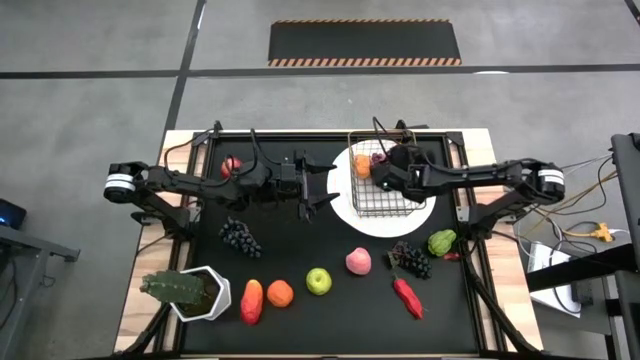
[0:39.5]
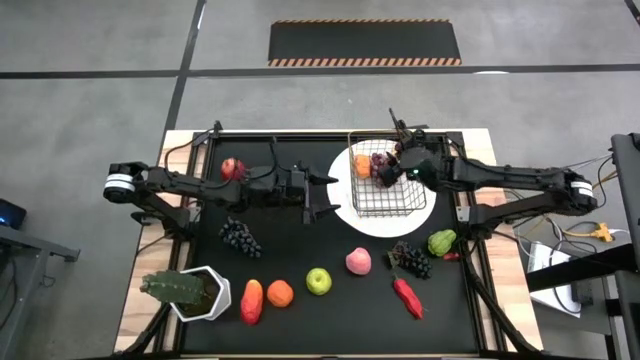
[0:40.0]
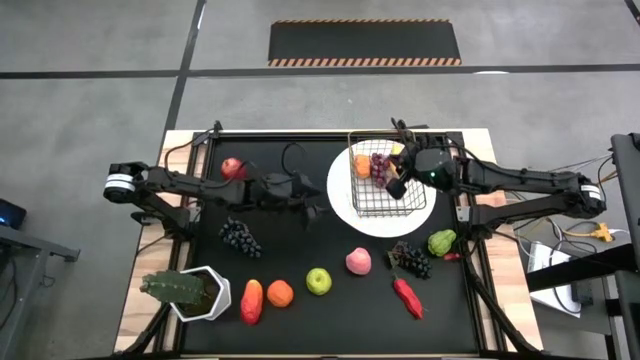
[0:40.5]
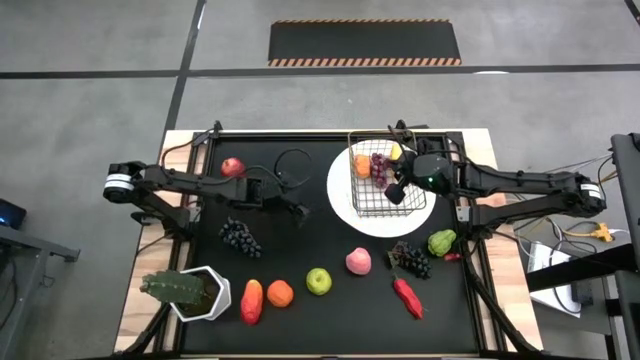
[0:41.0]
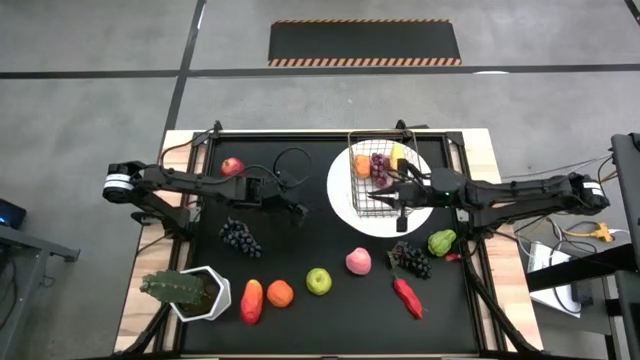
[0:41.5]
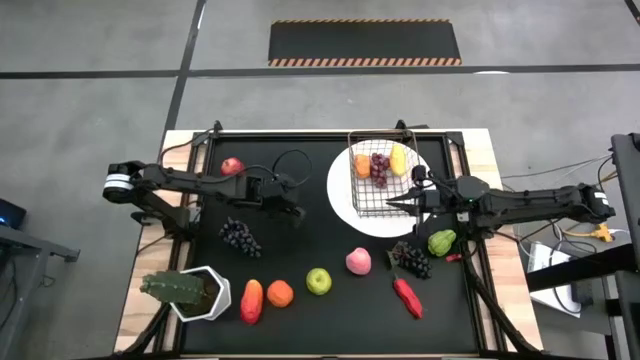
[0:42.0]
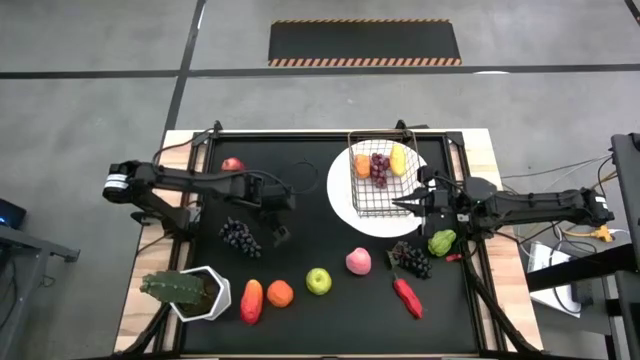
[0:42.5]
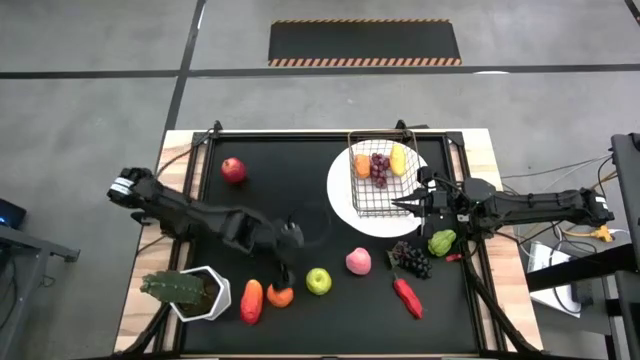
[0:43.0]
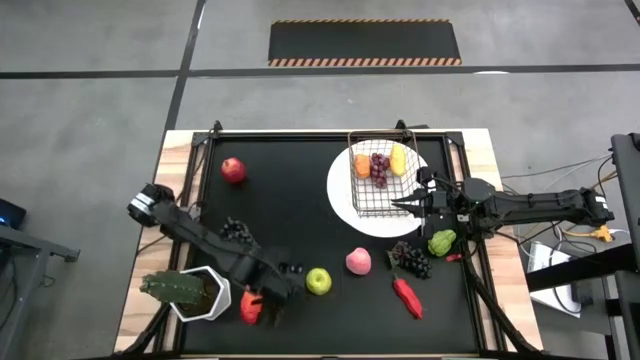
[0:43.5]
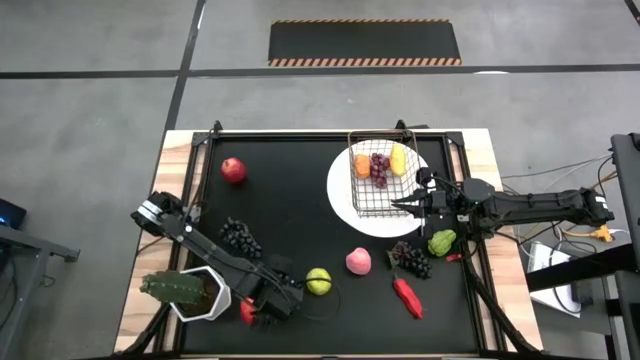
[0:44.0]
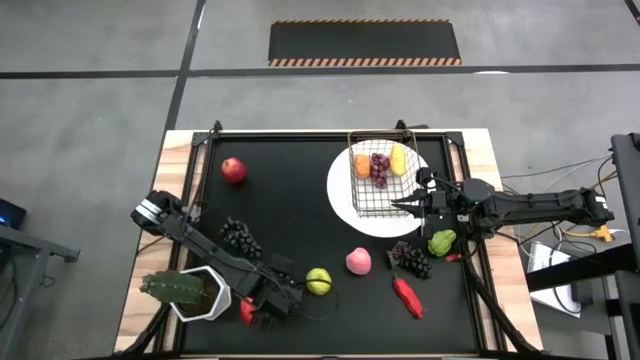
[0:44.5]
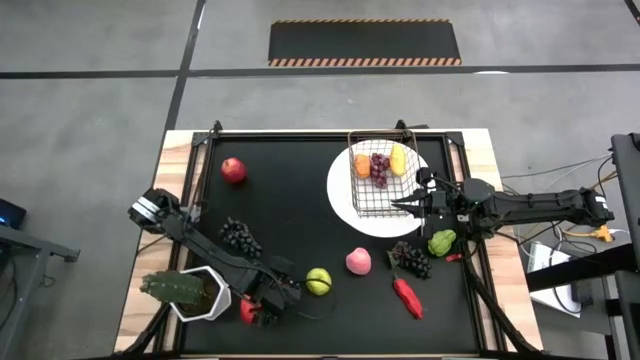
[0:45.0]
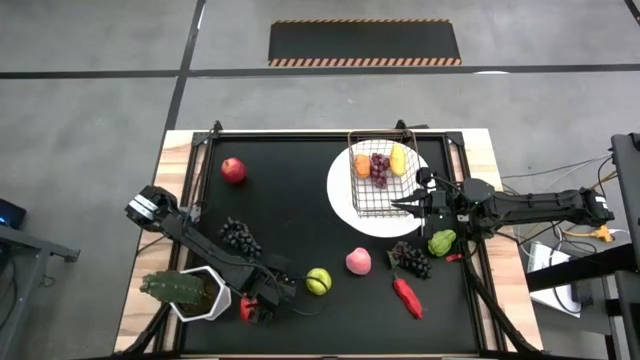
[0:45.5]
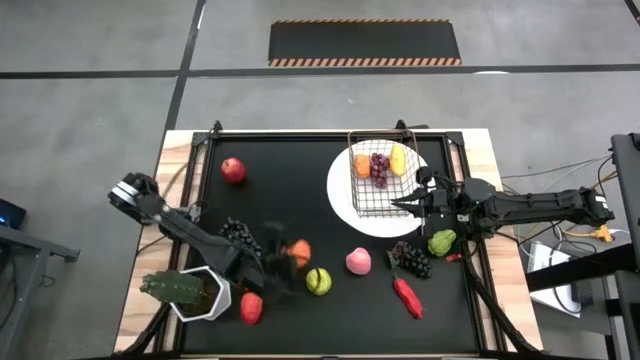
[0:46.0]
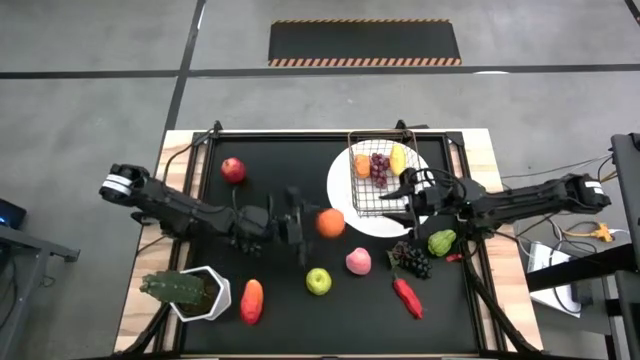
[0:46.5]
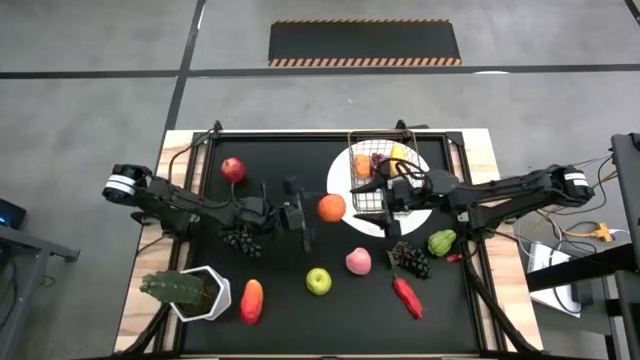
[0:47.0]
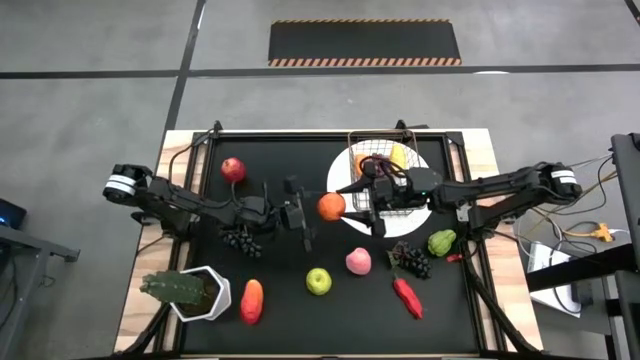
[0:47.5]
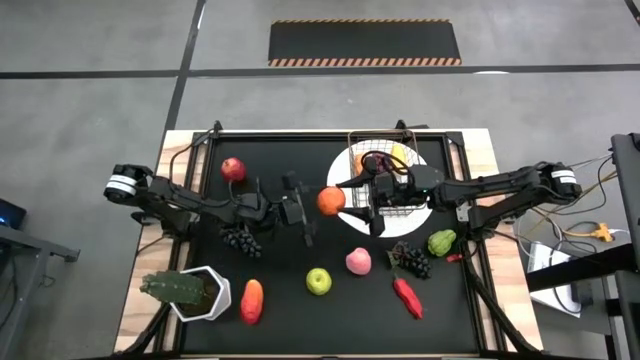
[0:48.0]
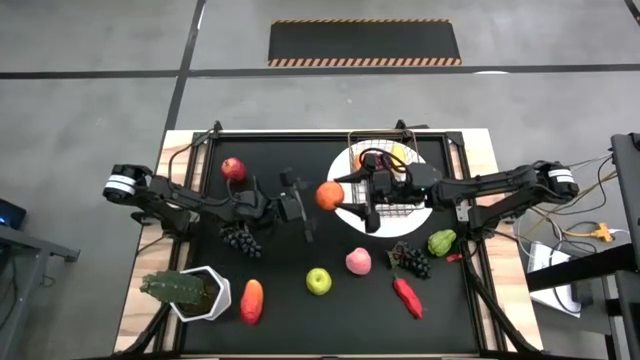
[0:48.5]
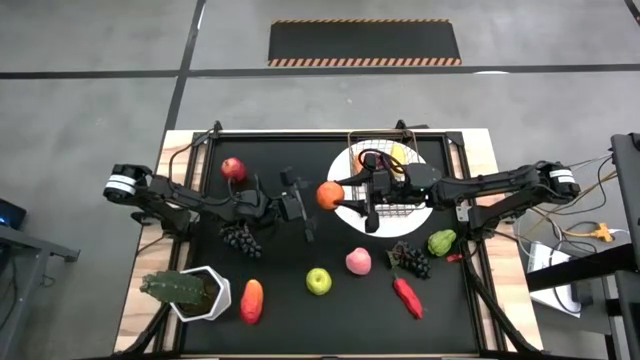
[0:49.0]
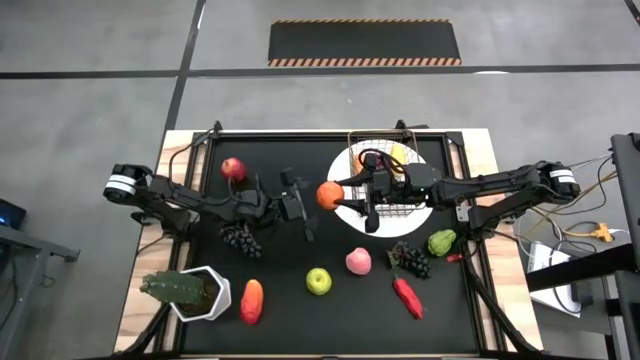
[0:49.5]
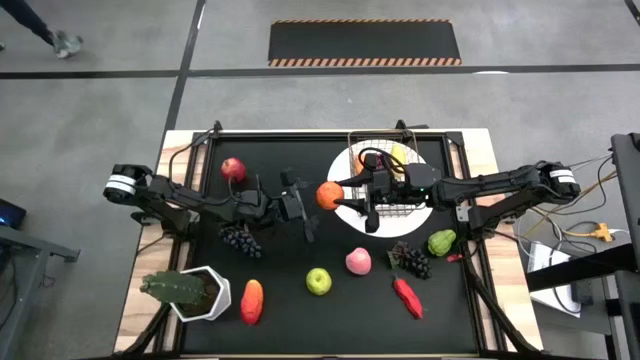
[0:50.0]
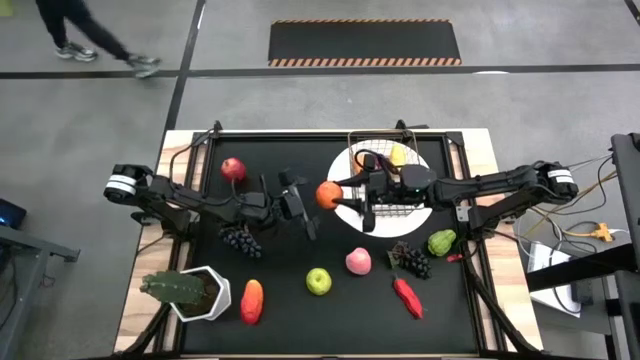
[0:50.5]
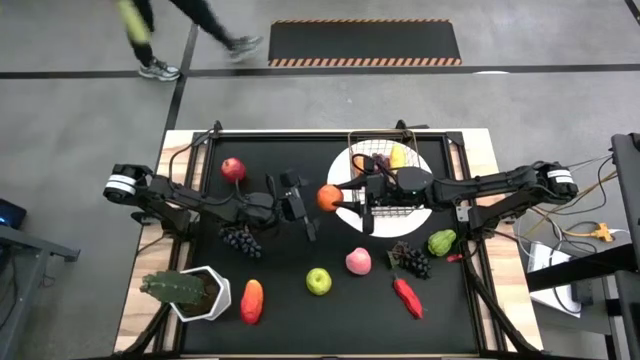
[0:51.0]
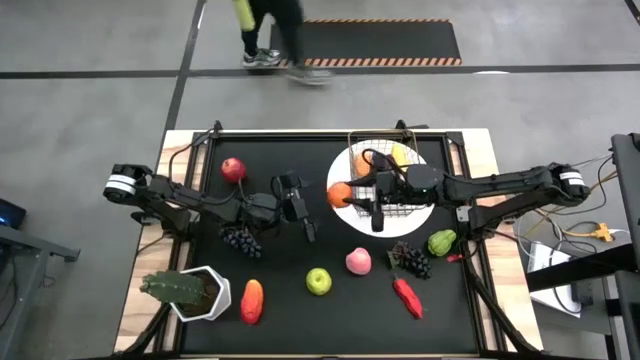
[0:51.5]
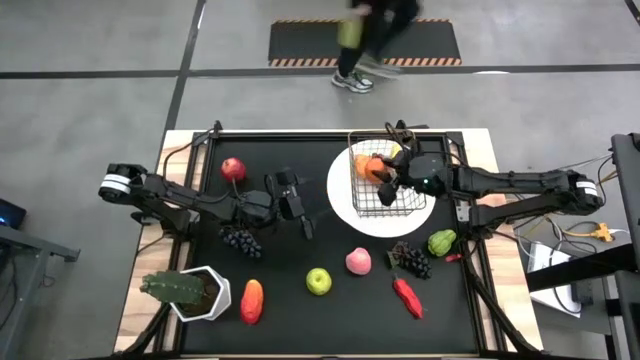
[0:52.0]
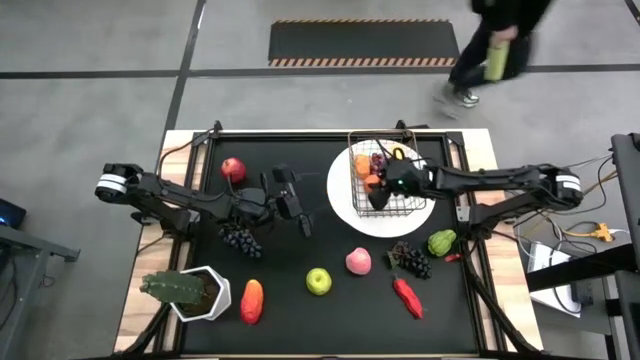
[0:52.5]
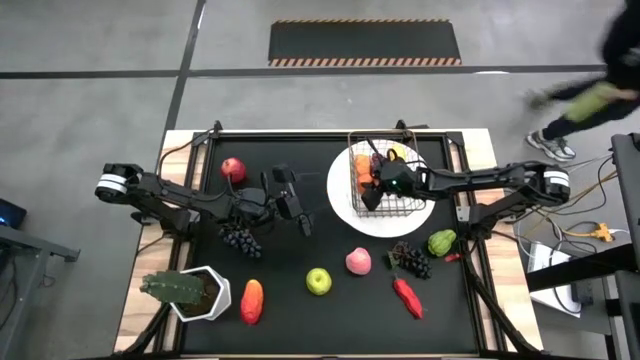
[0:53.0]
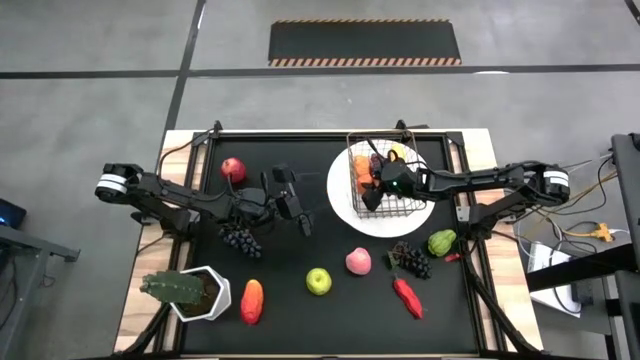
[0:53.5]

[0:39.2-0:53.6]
Task: Build produce basket
Put the orange into the wire basket

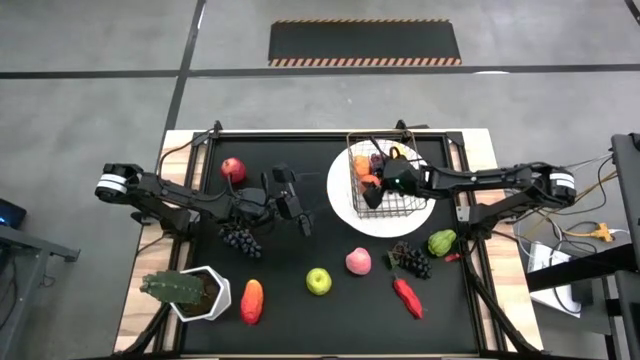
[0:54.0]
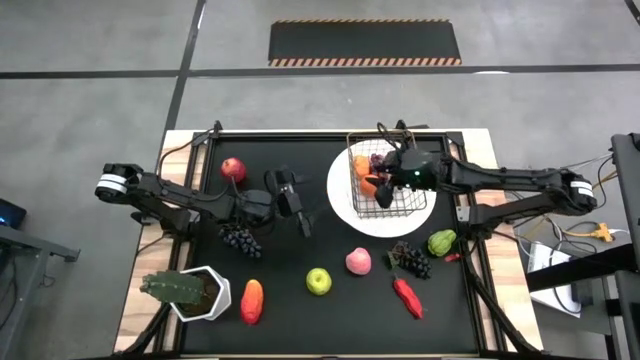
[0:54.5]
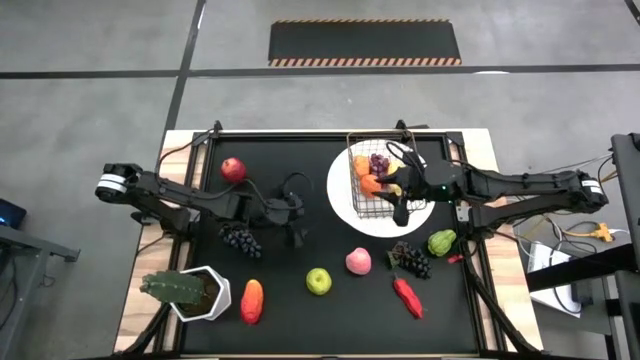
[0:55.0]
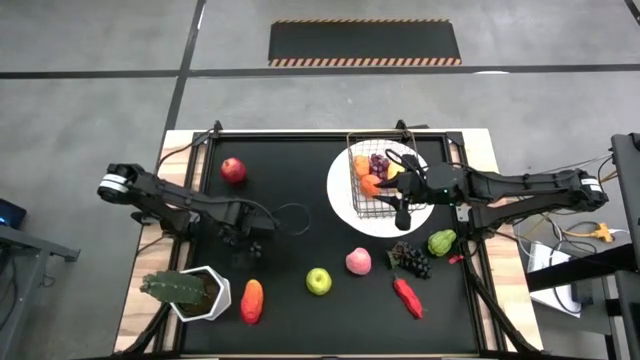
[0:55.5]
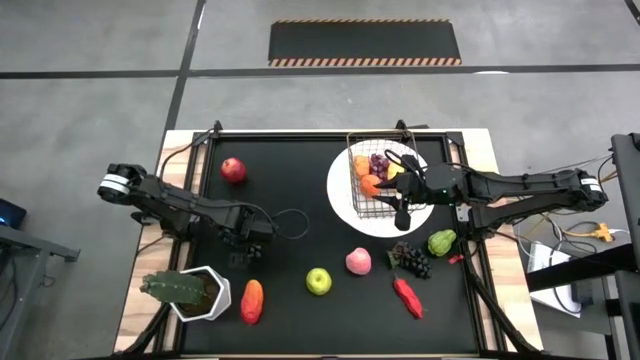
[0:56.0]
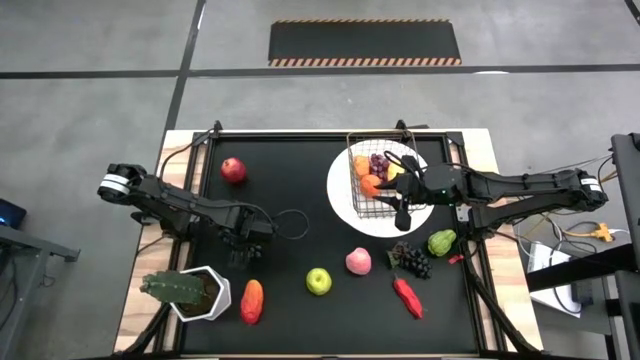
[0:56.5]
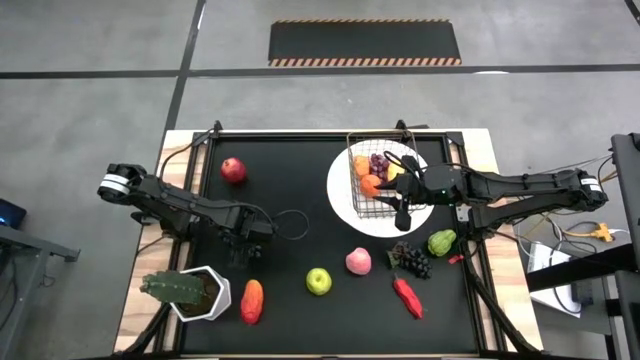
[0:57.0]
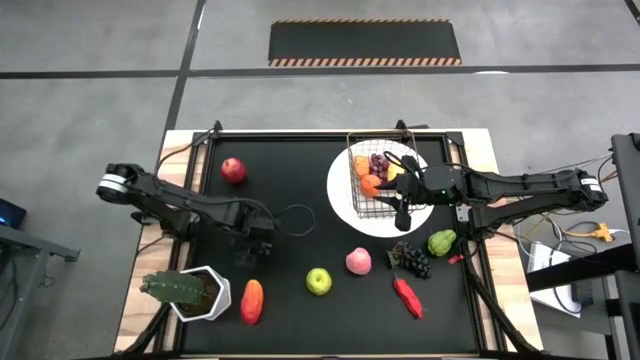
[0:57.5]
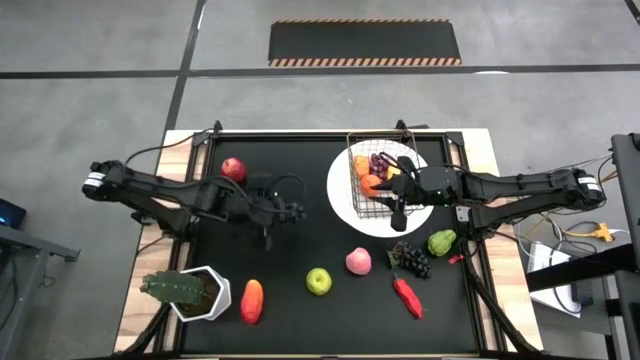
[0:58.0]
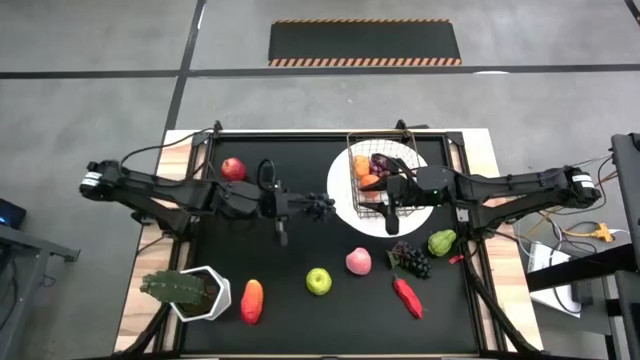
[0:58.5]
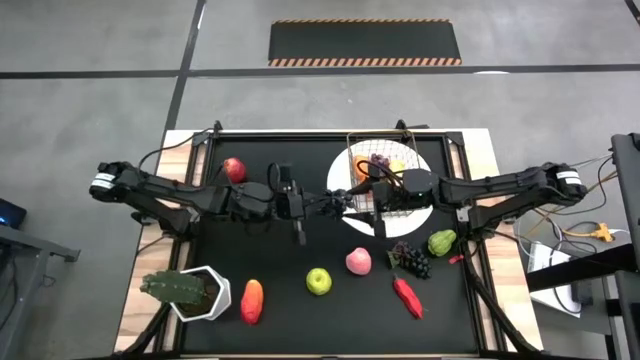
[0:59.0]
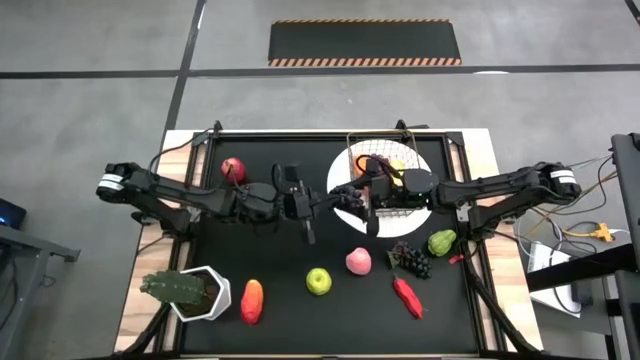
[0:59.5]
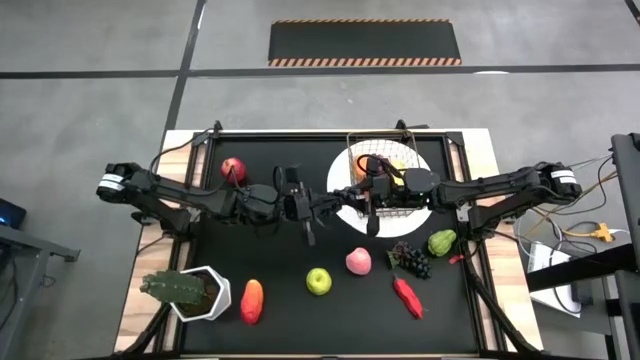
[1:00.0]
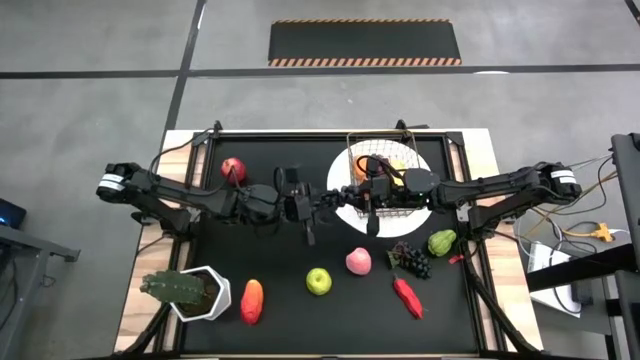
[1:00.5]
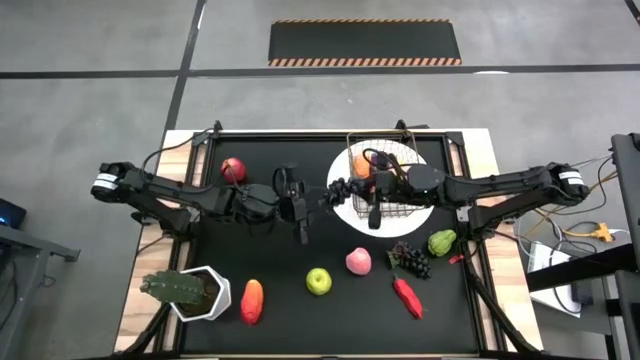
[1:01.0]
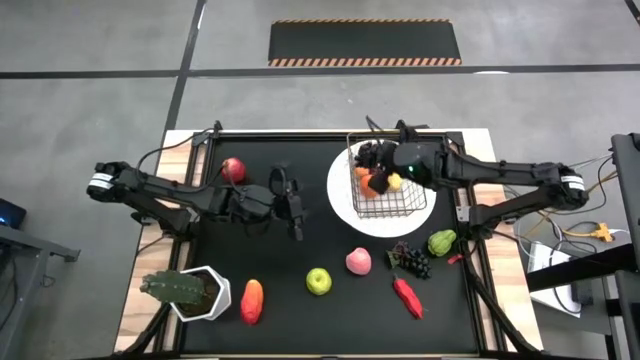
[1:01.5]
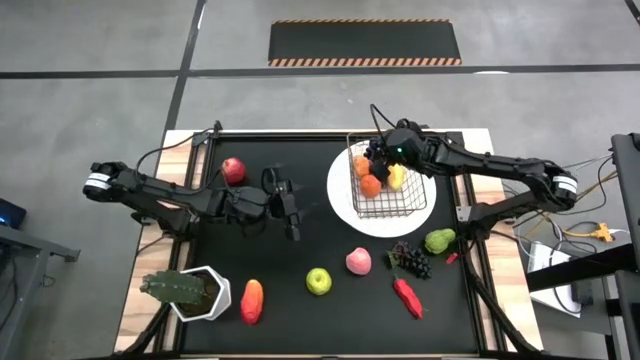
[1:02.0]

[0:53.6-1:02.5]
Put the black grapes into the wire basket

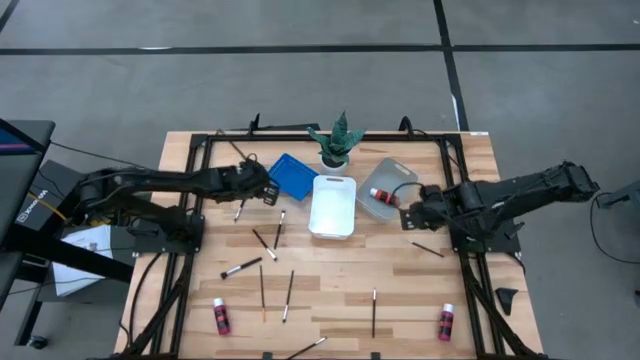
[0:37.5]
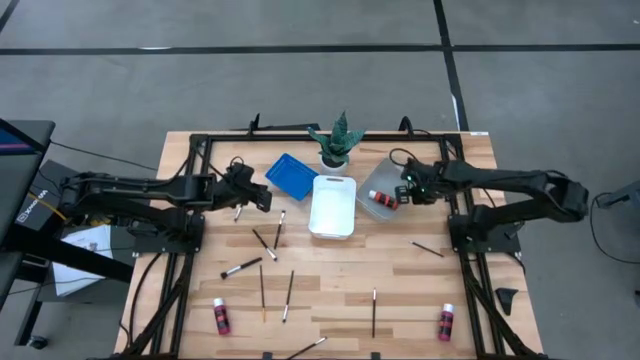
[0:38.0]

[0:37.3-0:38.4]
Task: Pick & Place Paint Supplies
Adjust the gray bin
